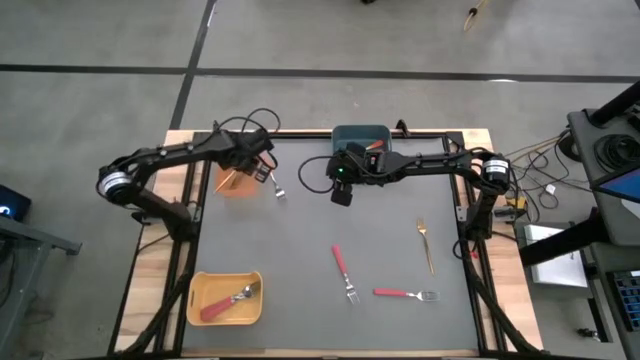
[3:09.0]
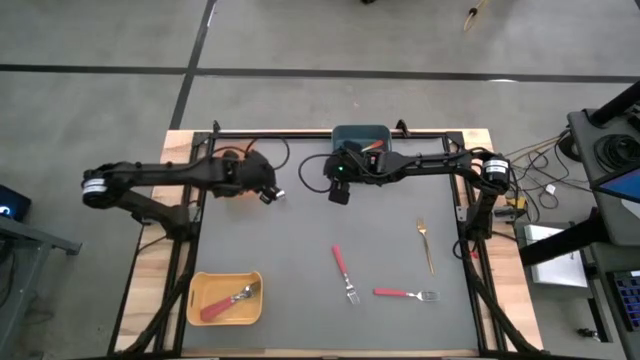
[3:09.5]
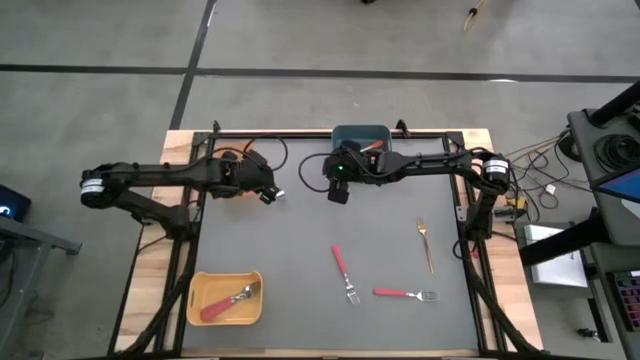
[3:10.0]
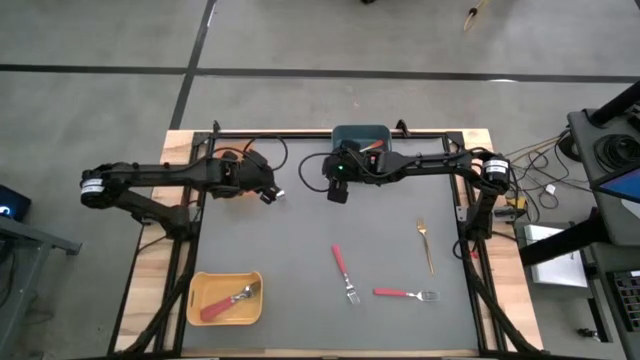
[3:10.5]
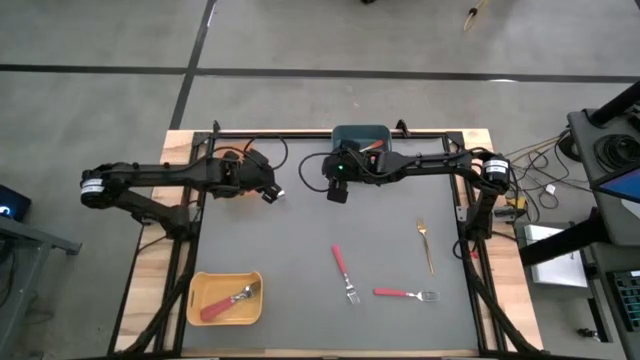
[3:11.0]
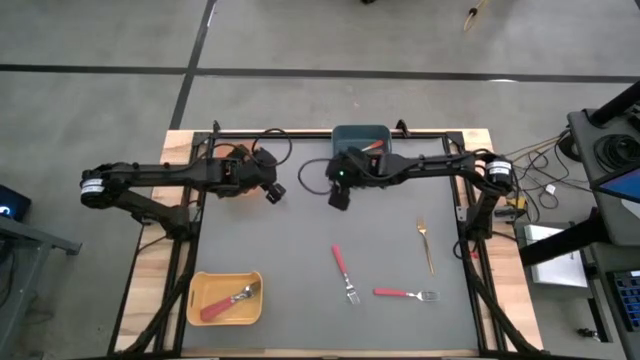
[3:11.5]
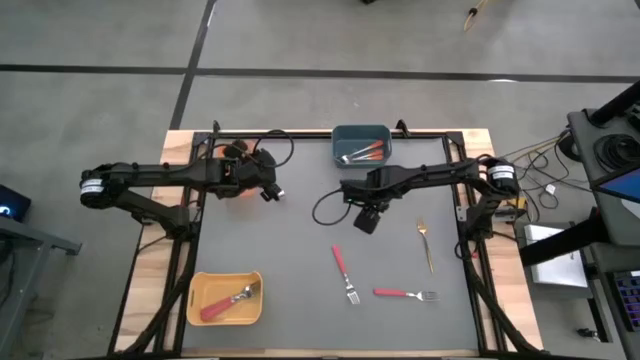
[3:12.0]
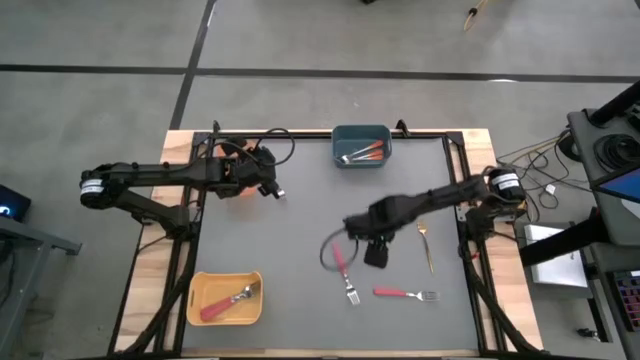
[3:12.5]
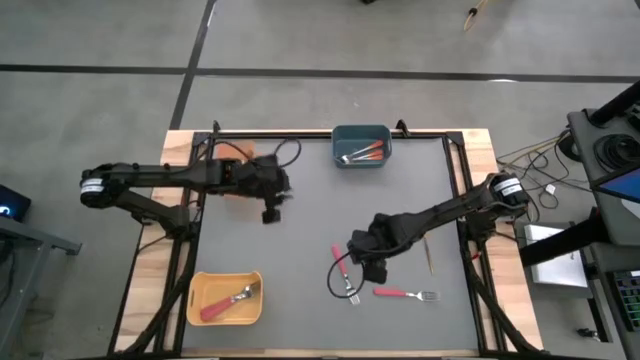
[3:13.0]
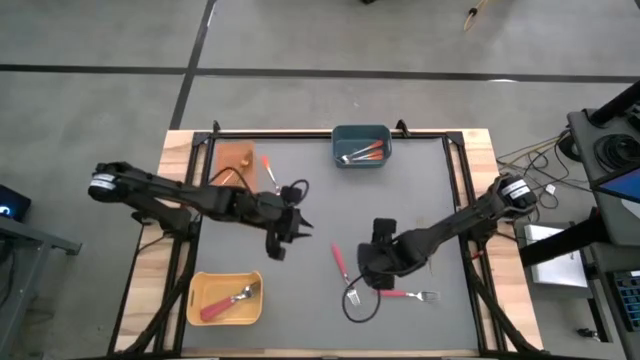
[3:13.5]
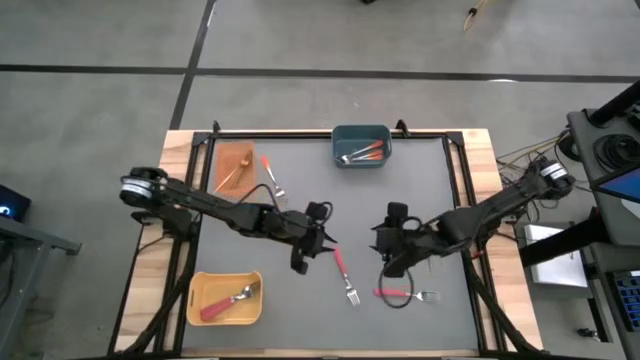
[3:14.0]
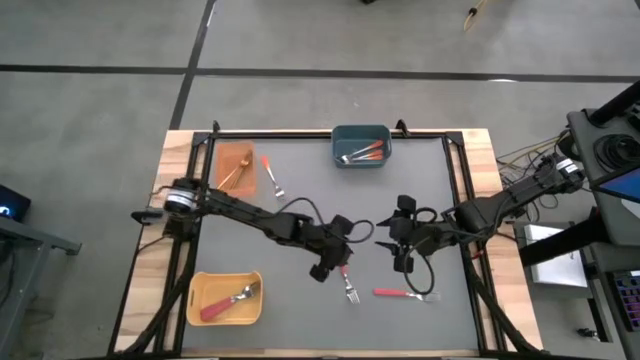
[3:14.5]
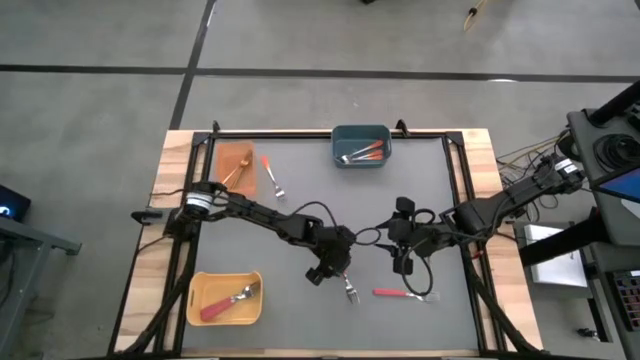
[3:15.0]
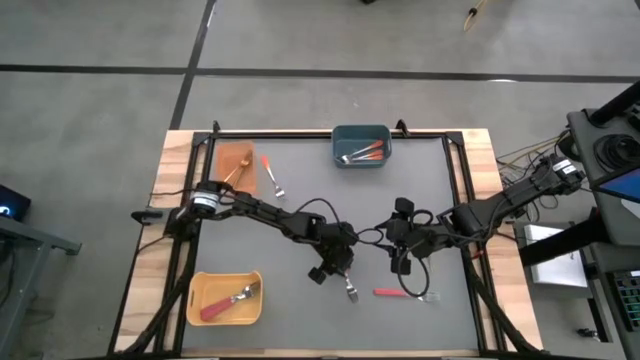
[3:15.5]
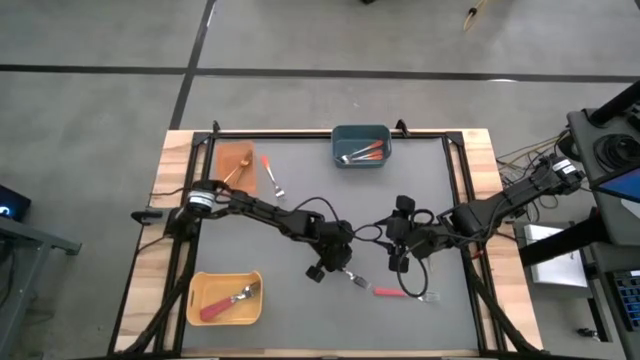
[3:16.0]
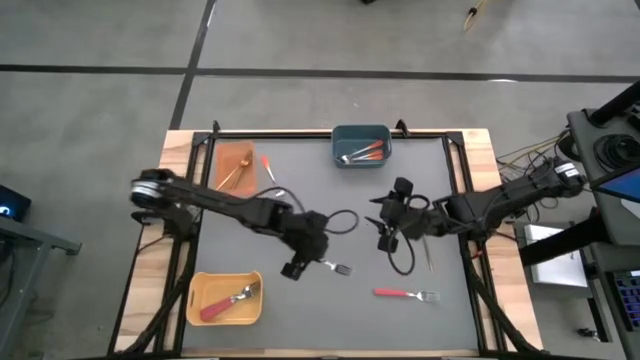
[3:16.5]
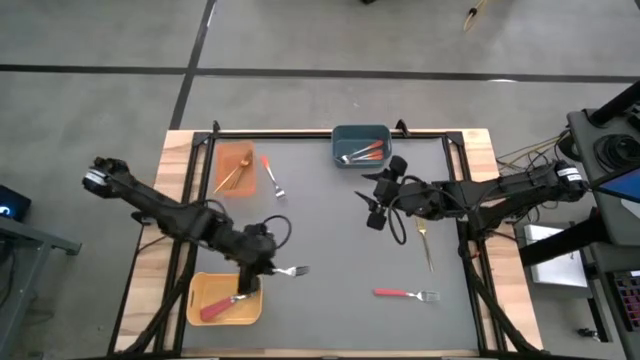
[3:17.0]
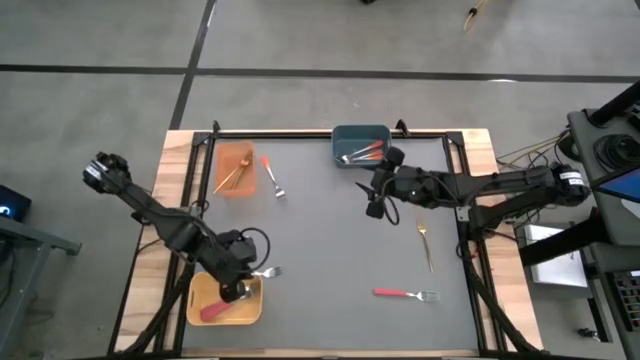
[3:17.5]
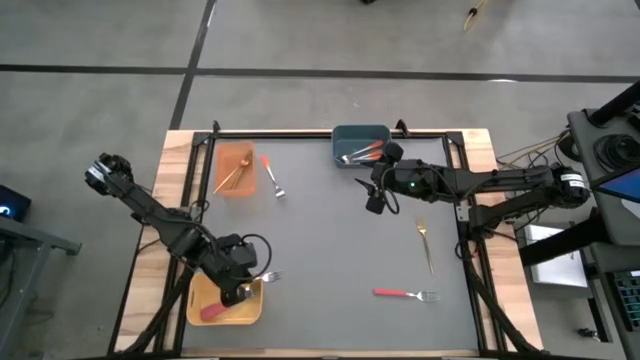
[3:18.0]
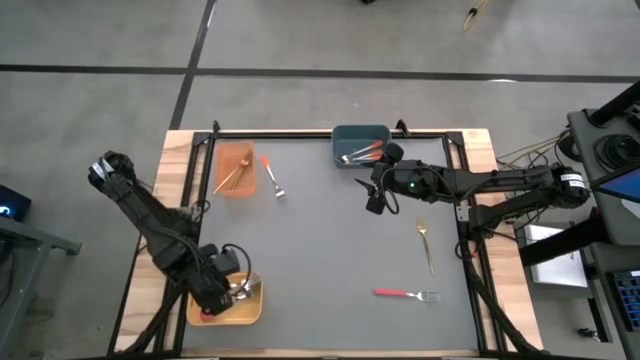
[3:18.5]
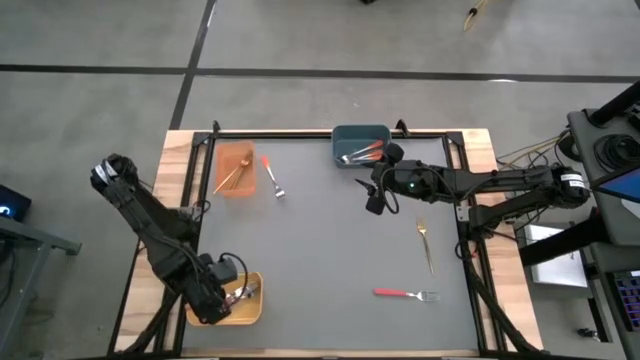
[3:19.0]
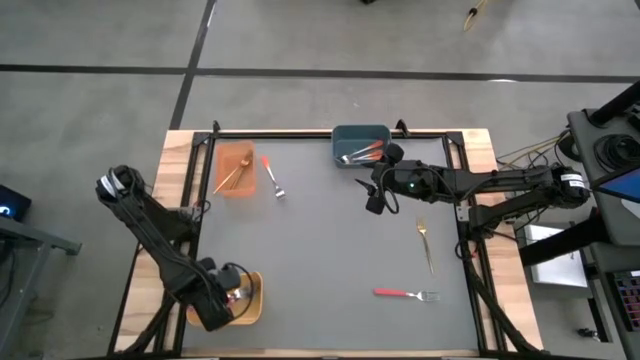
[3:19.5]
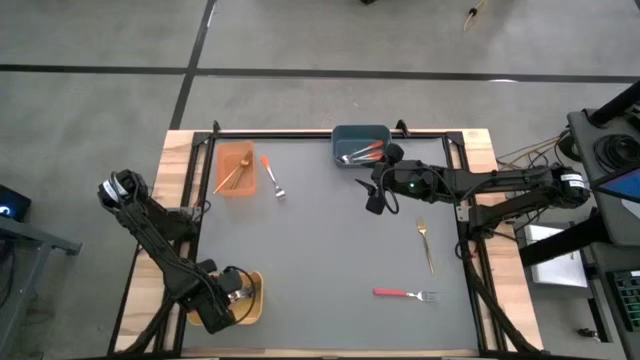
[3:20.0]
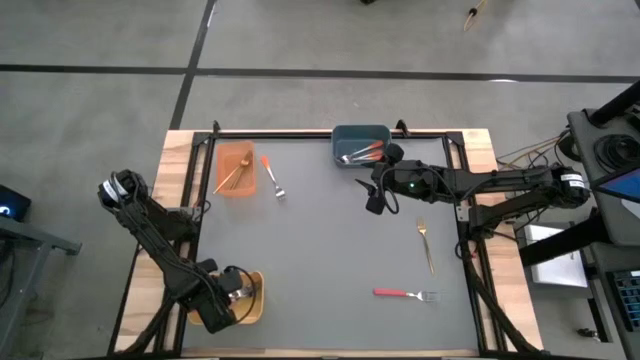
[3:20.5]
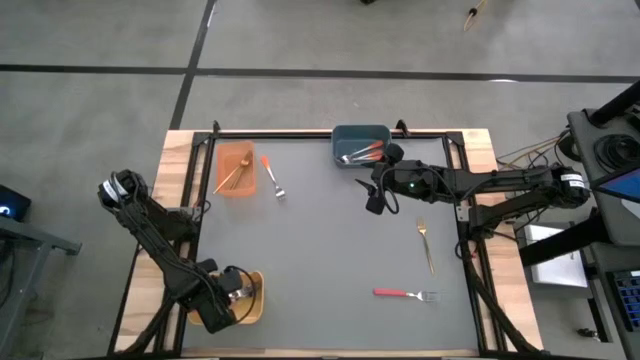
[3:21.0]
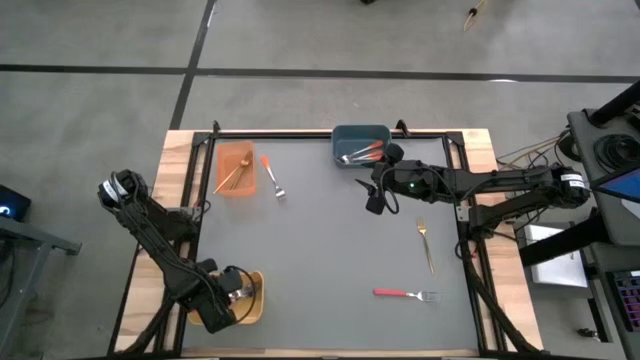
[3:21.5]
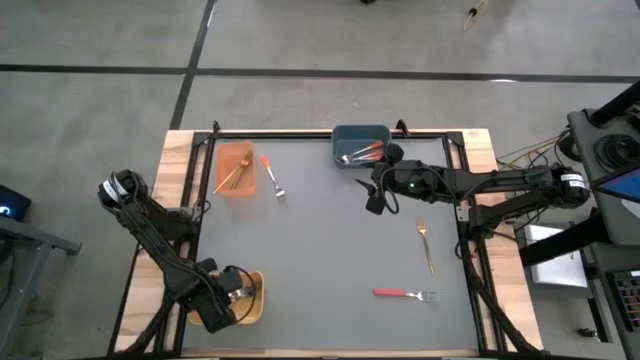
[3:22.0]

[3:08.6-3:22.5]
Task: Sort silverware by color (type)
Put the pink fork into the yellow bin

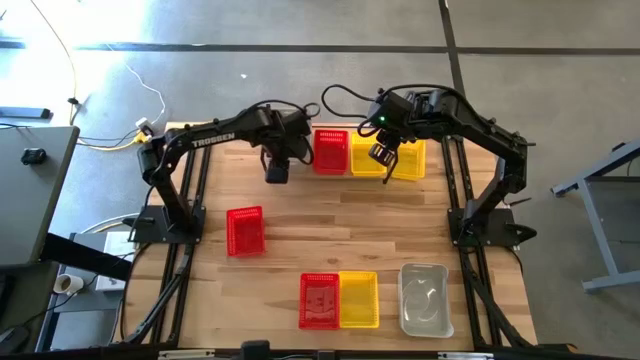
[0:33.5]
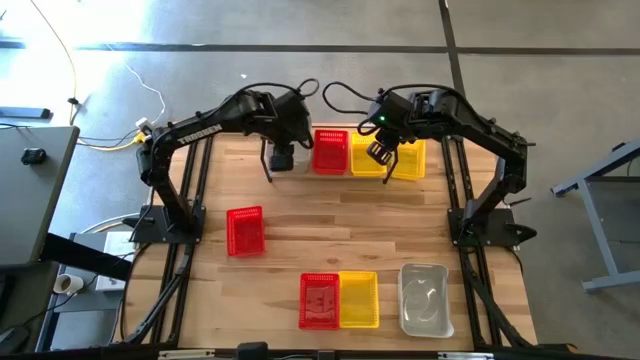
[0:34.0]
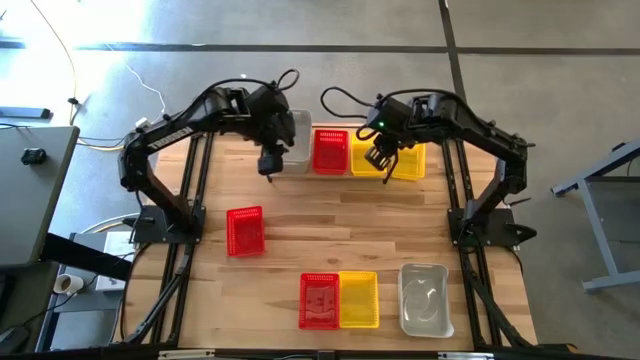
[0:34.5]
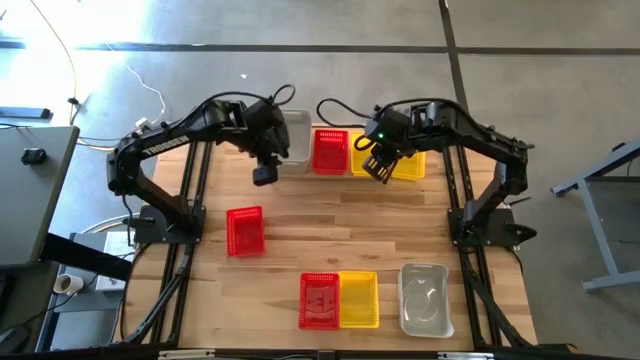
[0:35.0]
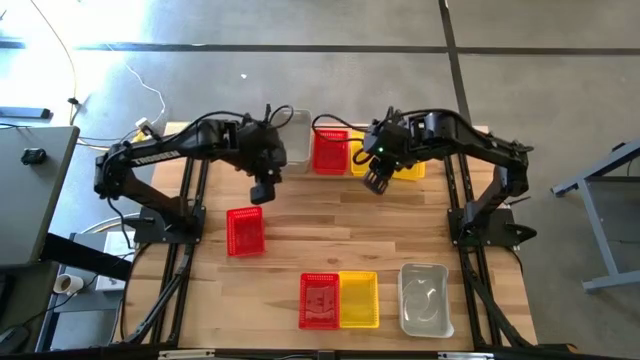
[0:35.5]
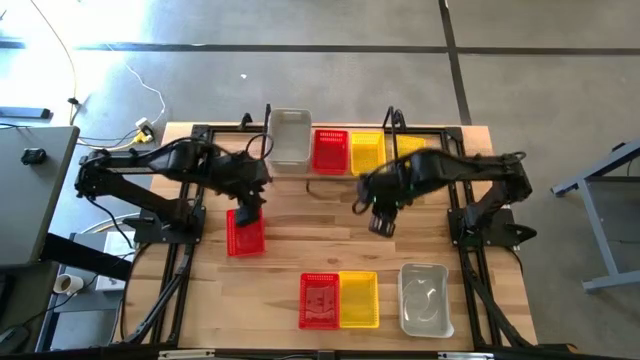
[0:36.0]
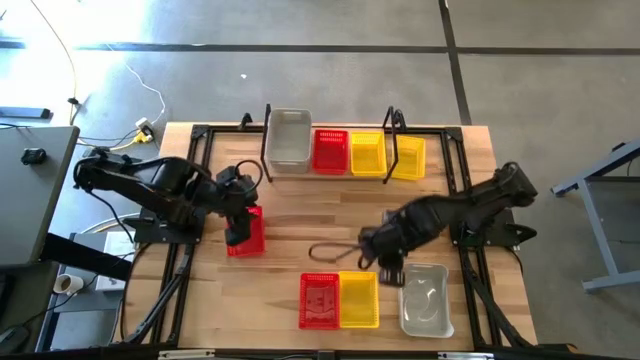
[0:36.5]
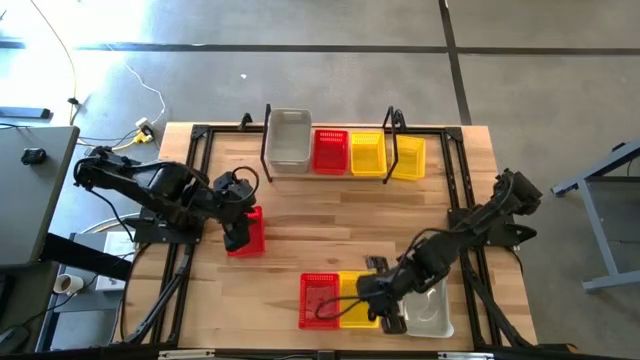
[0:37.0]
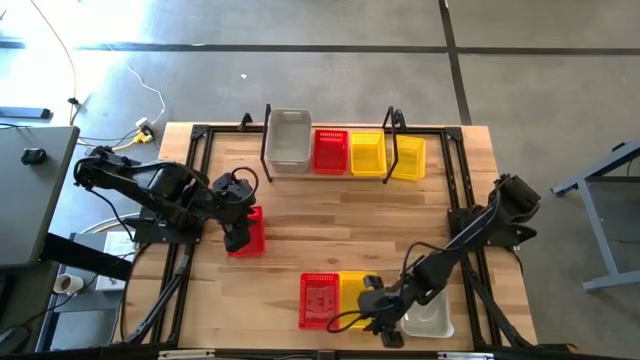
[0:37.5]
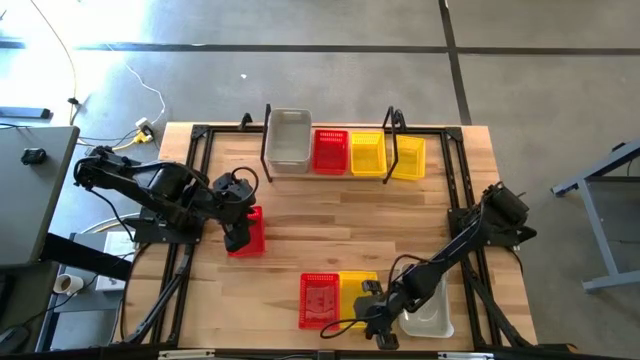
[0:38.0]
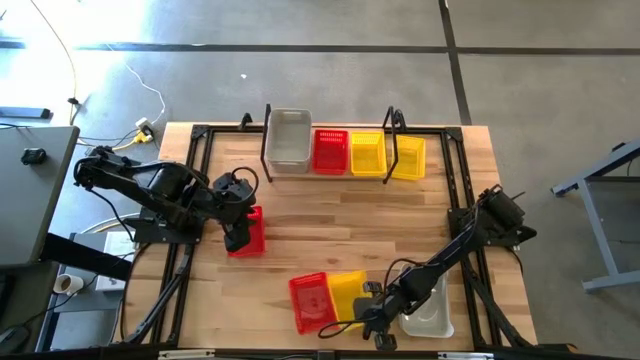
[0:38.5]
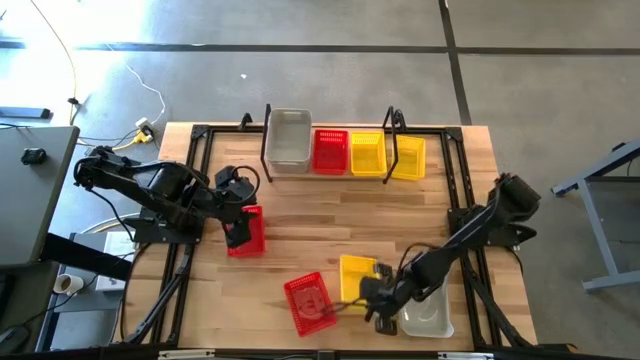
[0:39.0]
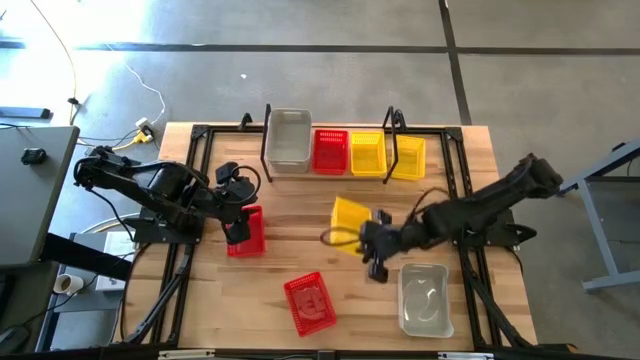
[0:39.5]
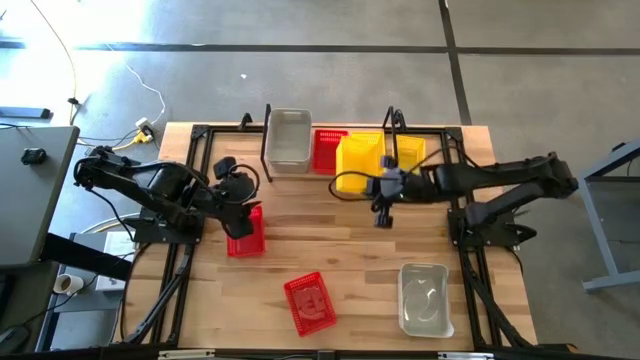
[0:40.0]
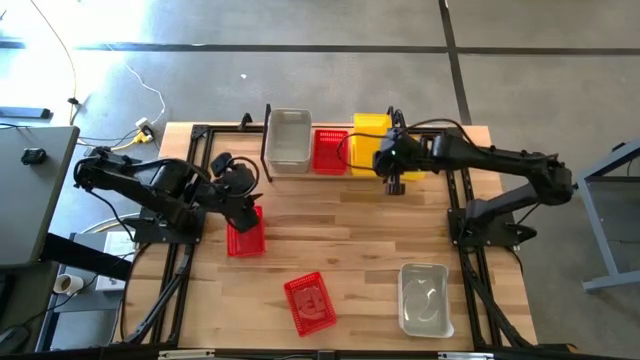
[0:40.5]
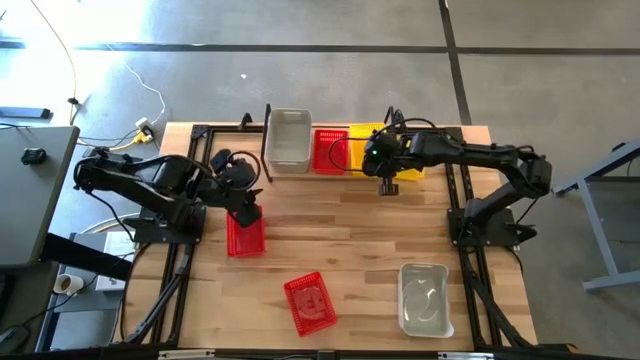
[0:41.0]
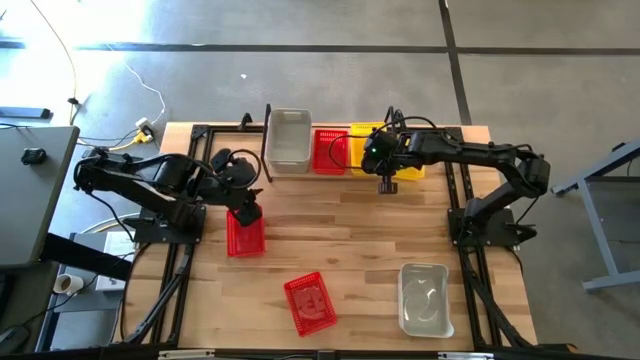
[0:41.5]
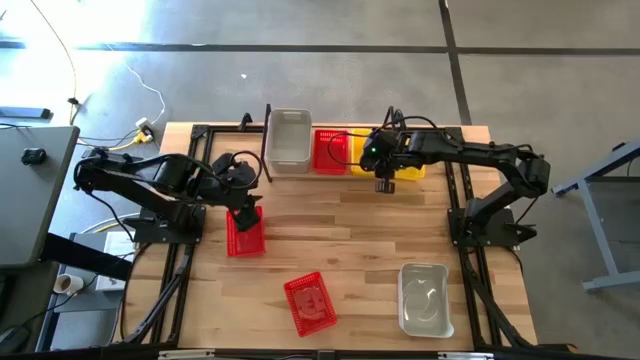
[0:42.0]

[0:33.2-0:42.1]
Task: Stack baskets on shelf by color
Stack the bottom yellow bin on top of the yellow bin

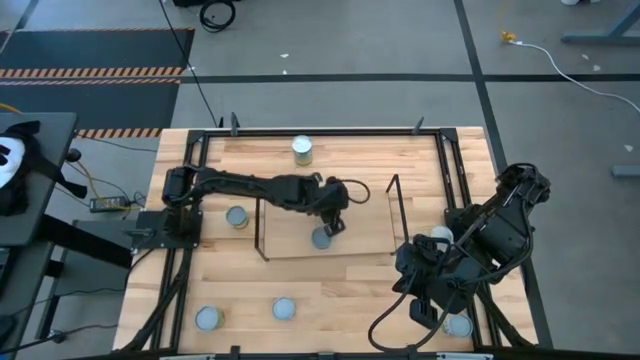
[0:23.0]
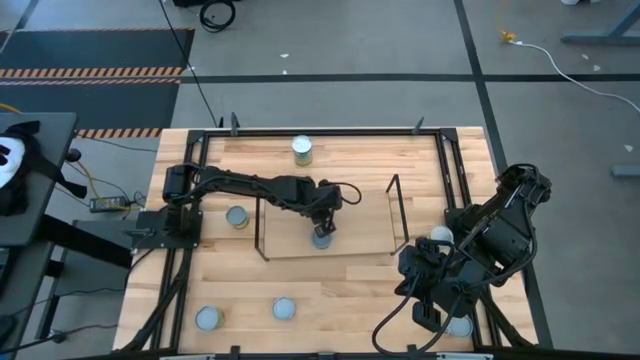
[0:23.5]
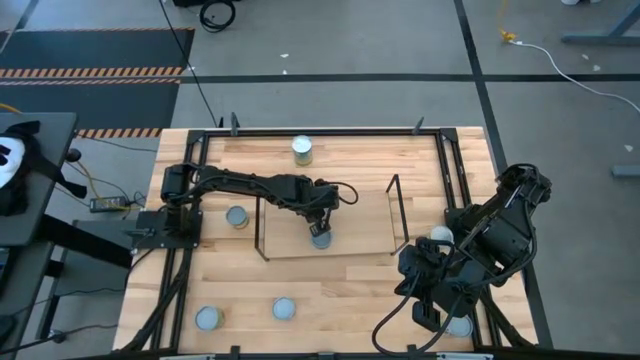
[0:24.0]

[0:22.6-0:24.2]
Task: Pick and place cans onto a shelf
Adjust the canned mushroom on the shelf
